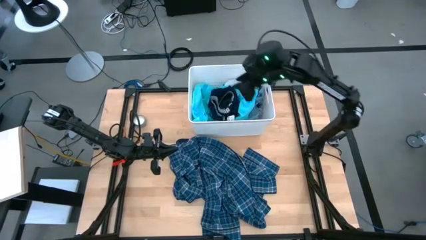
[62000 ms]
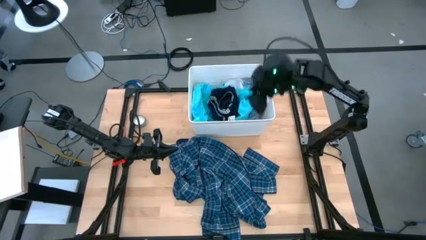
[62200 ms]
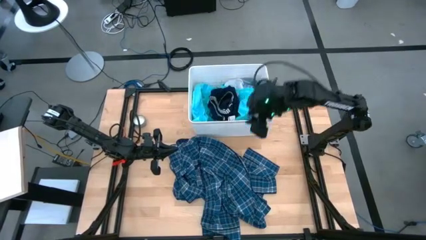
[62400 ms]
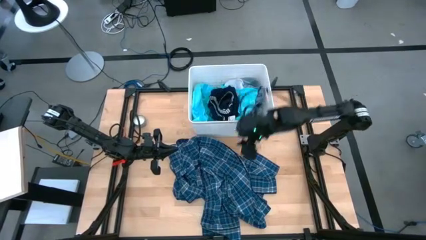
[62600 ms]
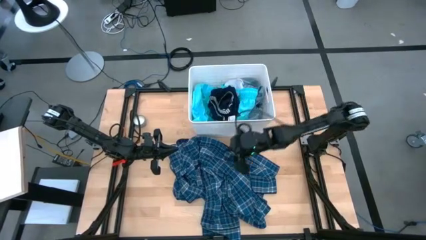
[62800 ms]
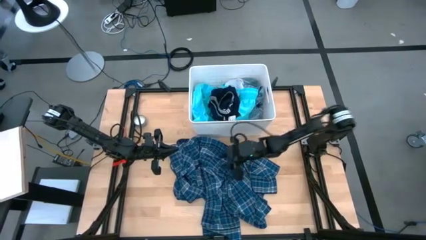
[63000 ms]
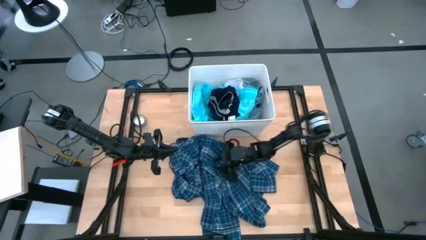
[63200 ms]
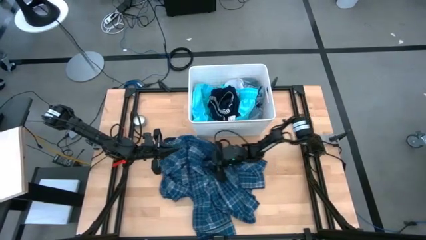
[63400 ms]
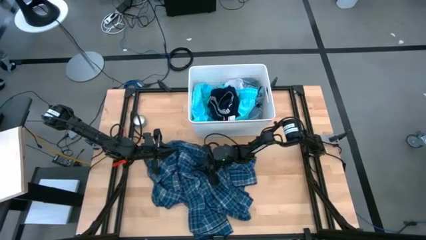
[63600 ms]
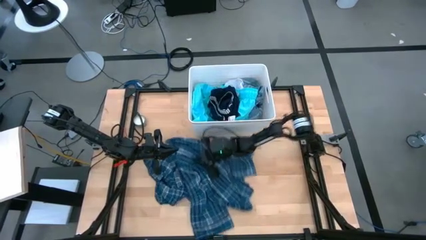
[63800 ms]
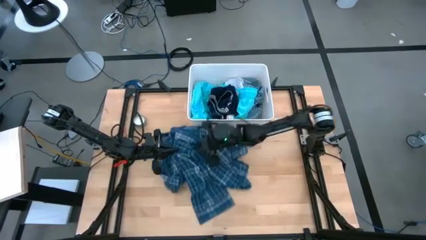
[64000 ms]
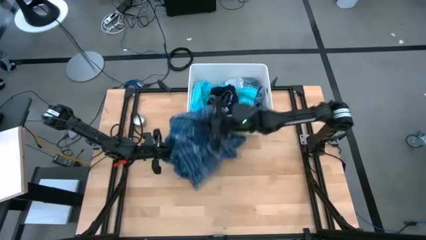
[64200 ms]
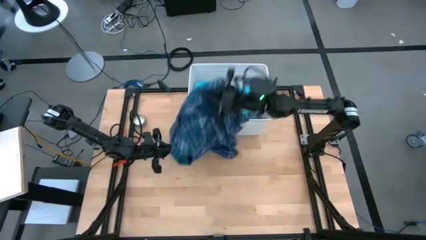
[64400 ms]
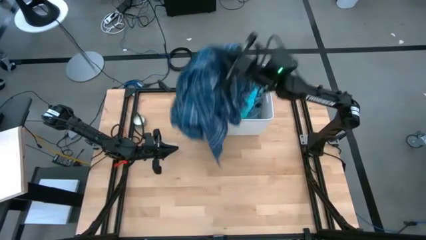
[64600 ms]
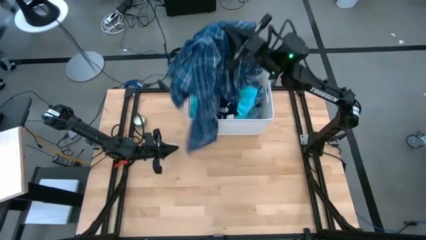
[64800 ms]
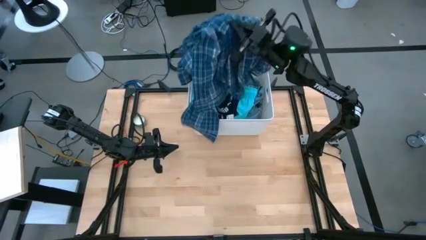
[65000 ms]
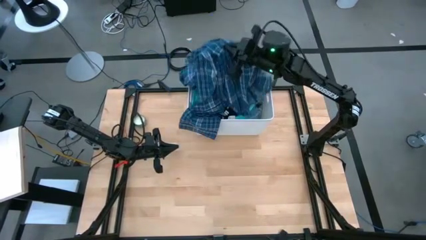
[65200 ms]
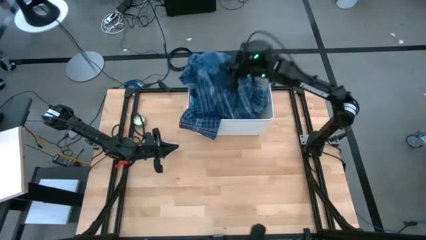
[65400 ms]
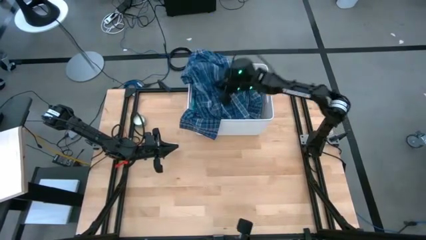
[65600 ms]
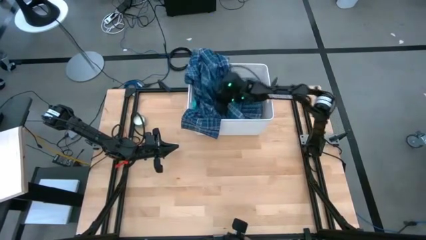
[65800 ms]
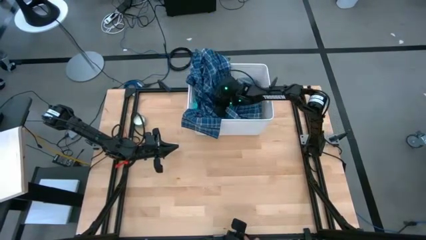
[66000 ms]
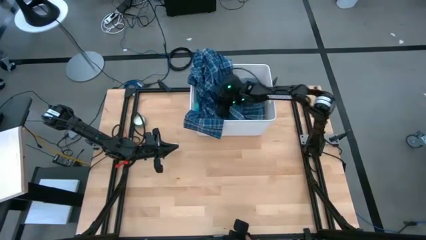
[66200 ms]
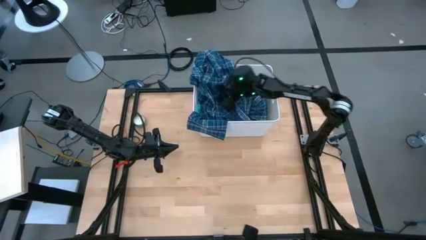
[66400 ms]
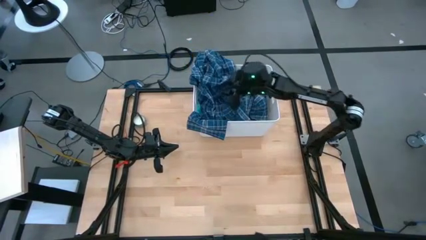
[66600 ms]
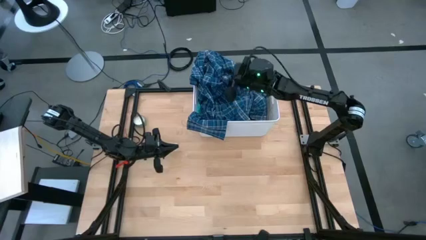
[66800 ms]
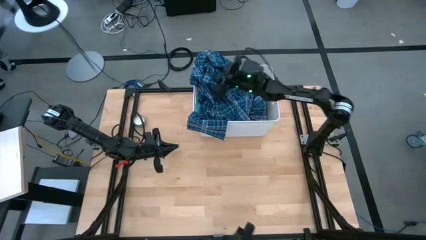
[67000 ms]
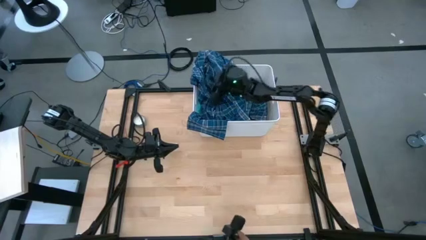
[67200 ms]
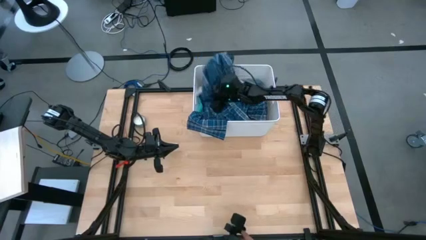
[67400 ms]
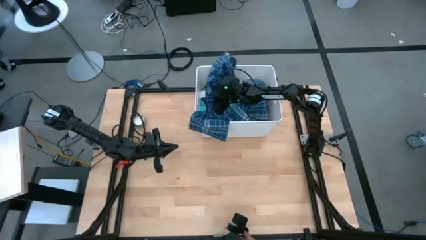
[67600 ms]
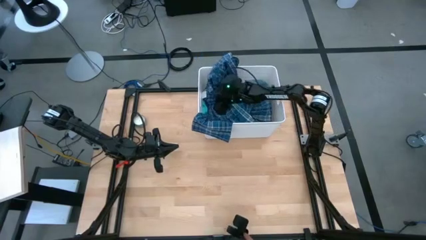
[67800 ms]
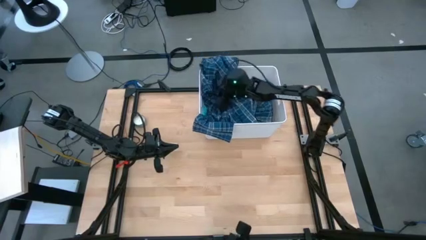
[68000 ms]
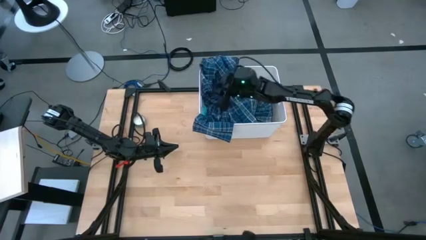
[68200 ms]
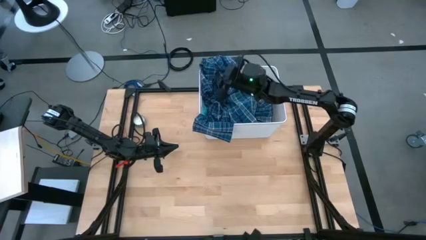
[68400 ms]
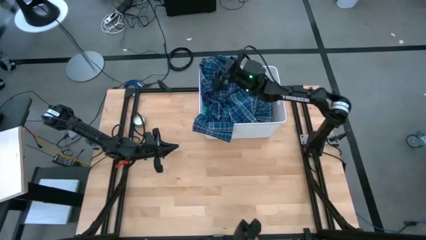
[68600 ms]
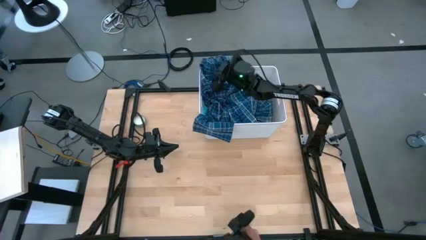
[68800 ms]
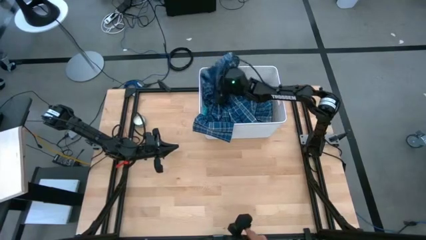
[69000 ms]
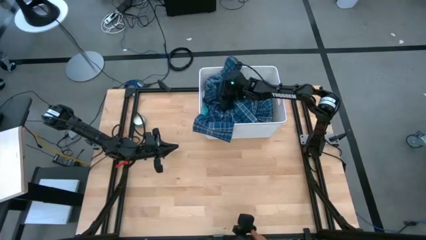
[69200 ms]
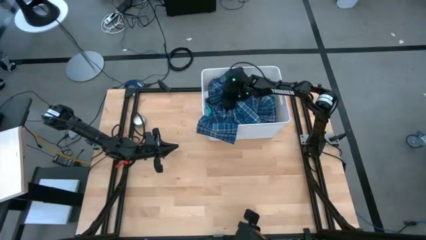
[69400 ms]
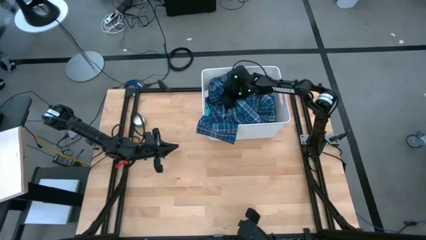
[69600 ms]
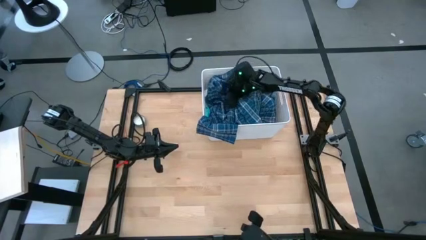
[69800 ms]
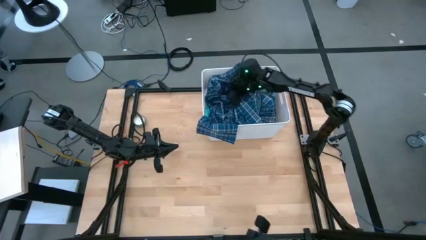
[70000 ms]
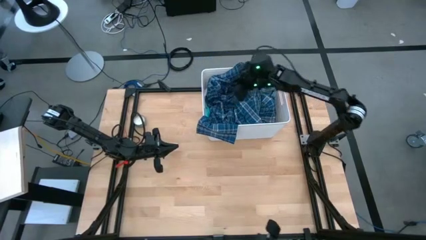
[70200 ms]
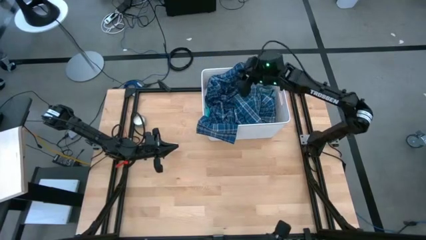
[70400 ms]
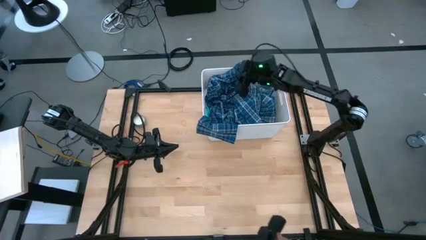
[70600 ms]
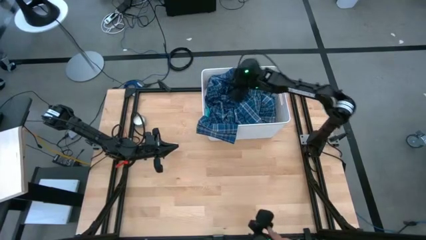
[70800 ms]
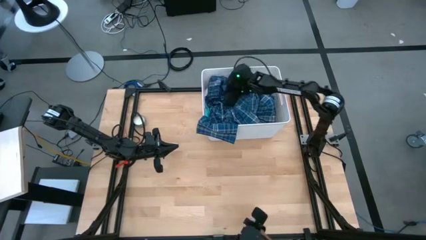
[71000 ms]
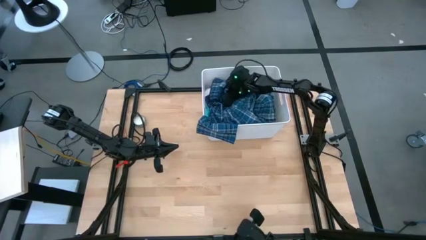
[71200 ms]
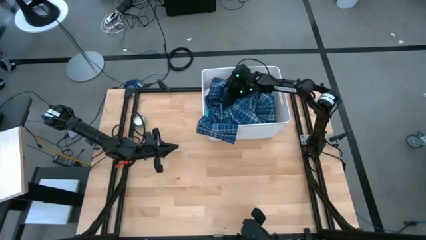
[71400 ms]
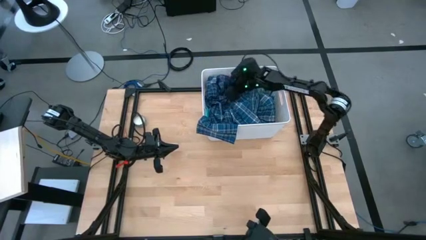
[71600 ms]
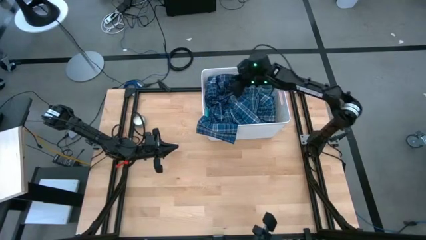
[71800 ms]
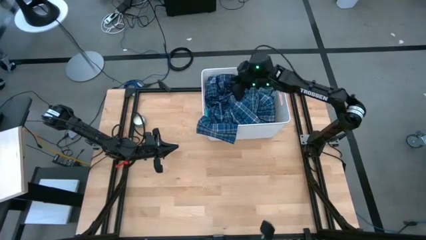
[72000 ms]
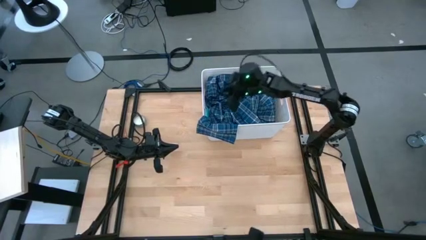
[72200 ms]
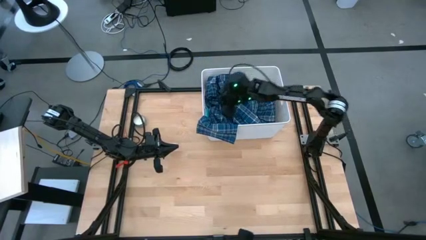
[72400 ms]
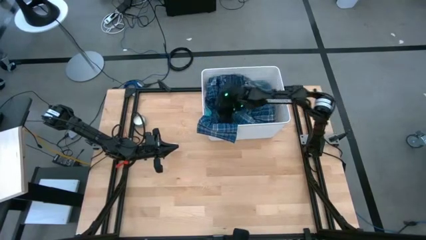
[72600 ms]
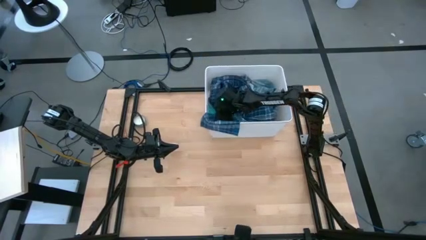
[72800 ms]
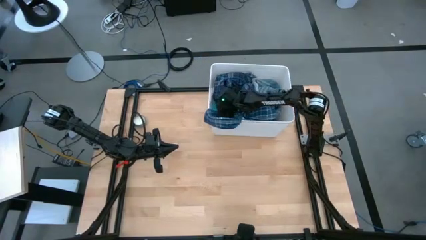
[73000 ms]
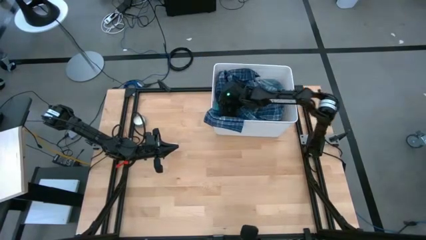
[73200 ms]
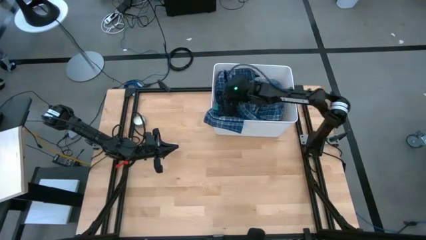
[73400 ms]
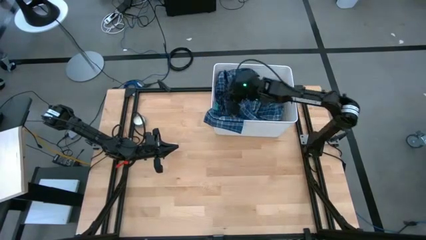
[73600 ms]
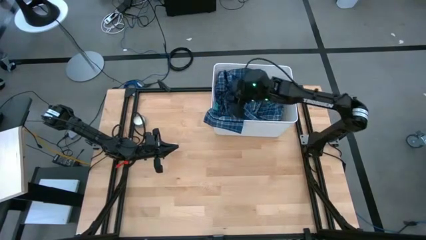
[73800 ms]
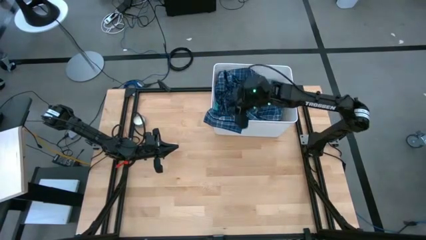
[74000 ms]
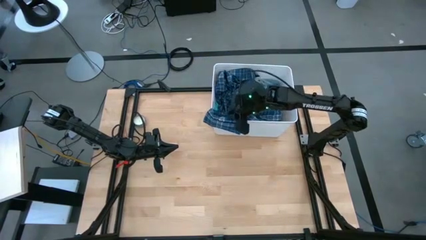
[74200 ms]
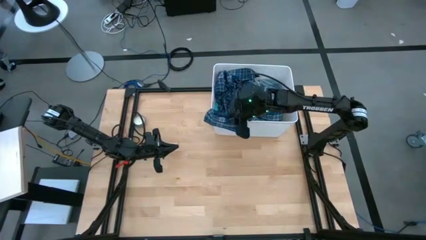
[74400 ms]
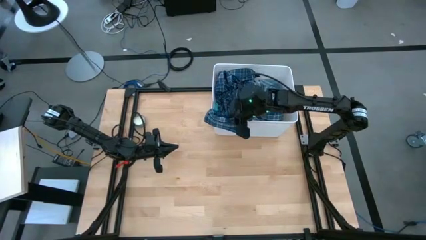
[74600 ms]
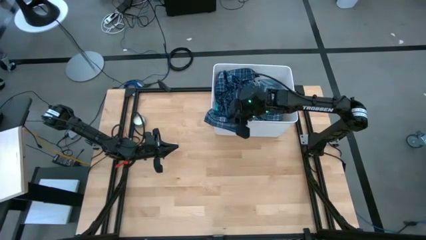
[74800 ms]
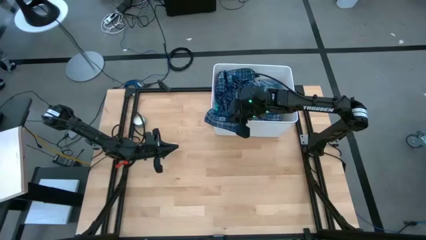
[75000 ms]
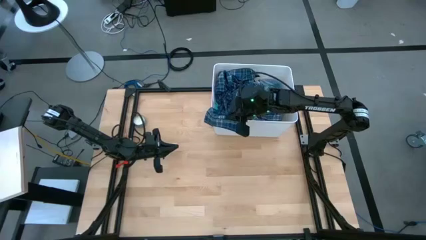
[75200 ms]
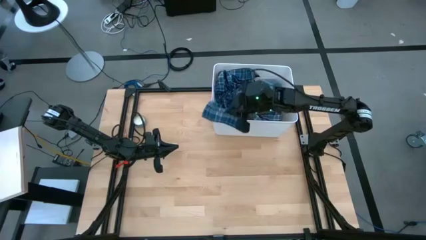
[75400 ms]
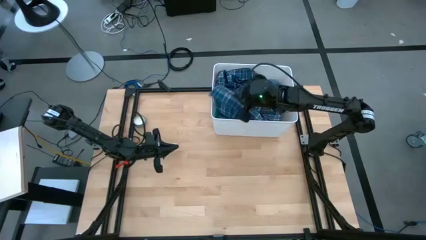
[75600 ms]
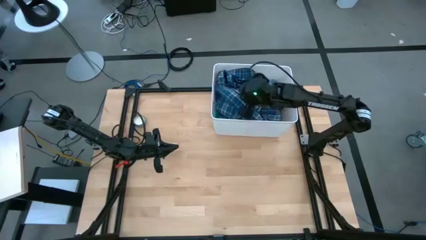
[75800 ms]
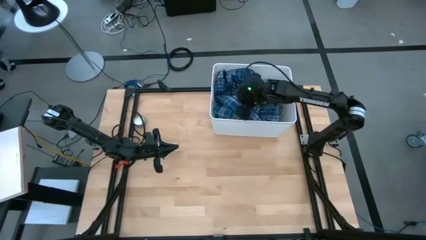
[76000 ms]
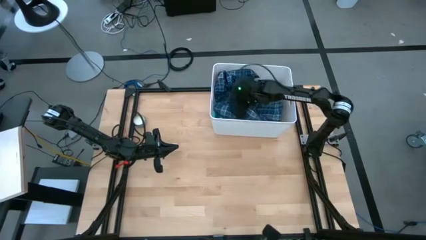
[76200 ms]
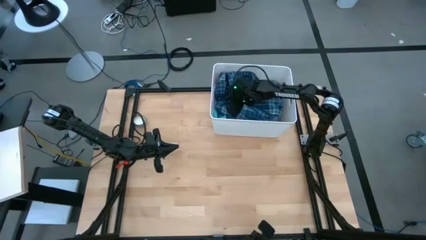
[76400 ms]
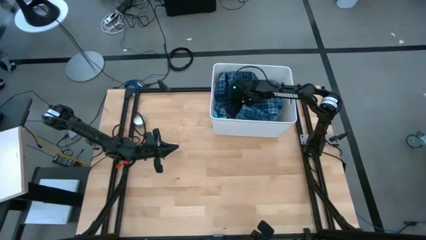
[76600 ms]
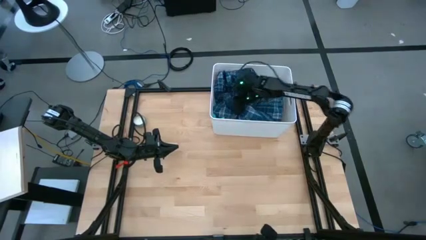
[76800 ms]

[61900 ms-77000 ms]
Task: Sort clothes
Put the blue shirt into the white bin

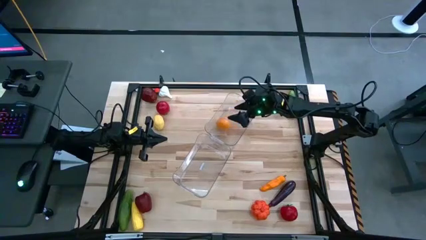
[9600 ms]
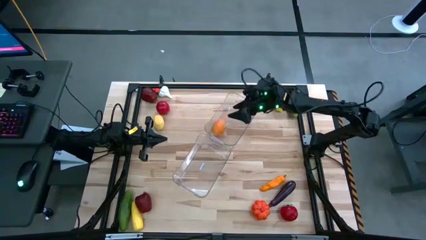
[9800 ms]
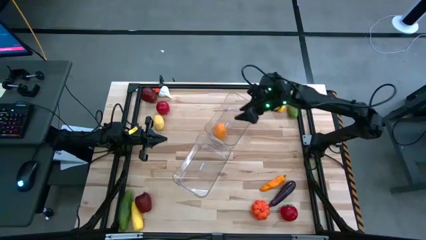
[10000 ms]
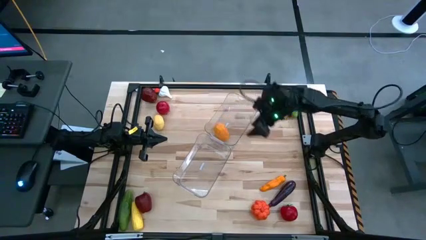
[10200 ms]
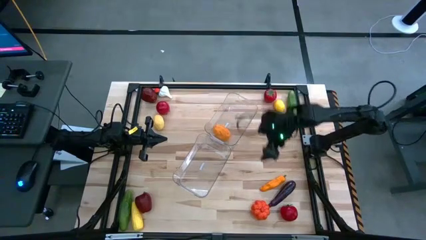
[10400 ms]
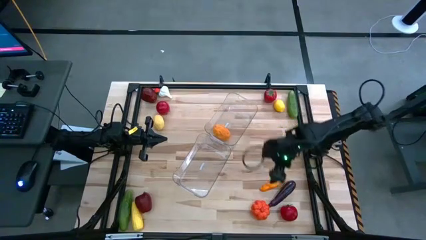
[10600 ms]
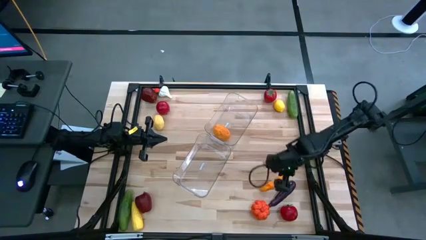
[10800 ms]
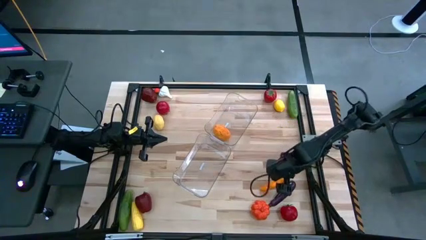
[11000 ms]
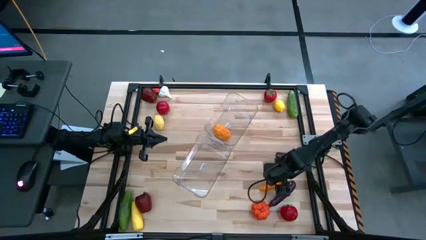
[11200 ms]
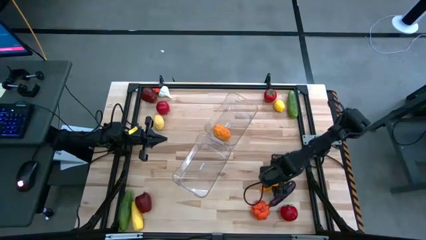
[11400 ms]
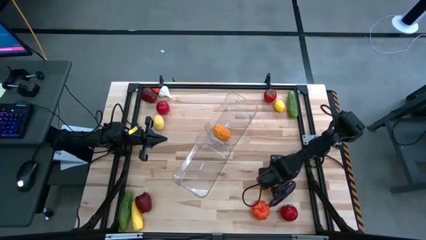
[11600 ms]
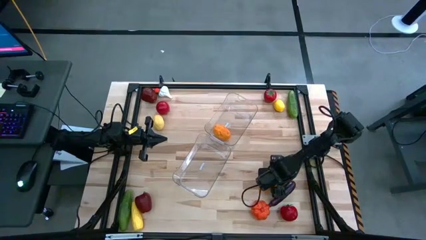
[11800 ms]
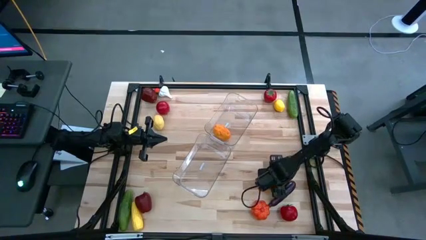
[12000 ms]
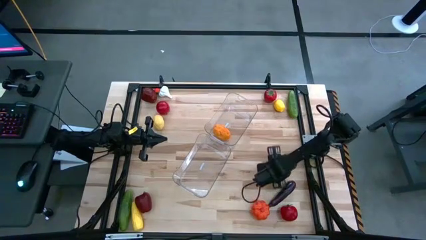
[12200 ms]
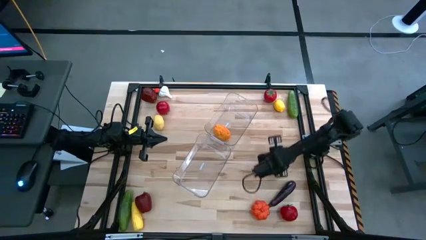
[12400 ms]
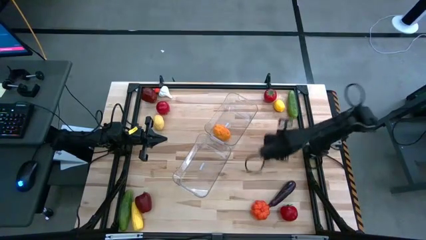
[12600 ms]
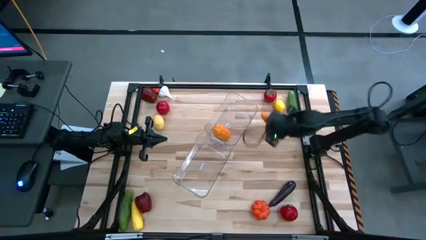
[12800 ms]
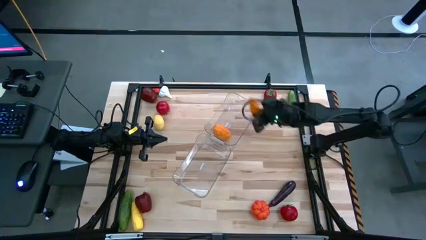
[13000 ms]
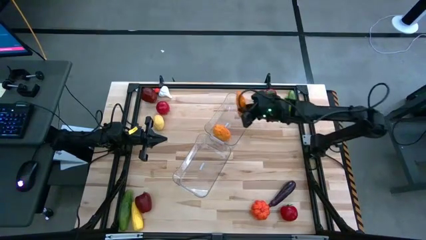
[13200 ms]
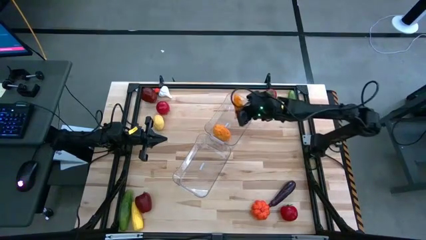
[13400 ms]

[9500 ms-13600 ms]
Task: Sort produce into baskets
Put the orange chili pepper into the top transparent bin
